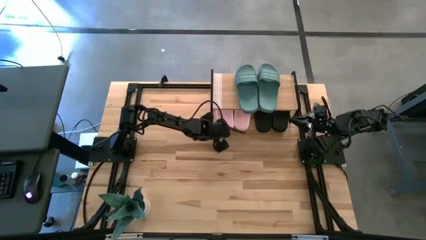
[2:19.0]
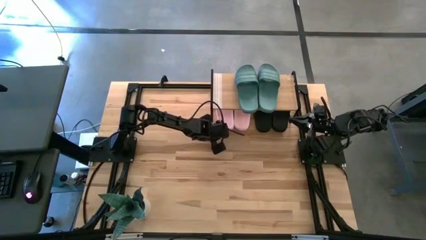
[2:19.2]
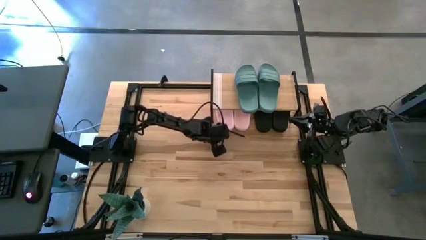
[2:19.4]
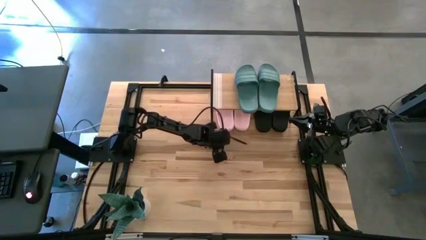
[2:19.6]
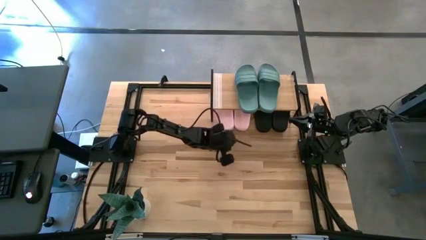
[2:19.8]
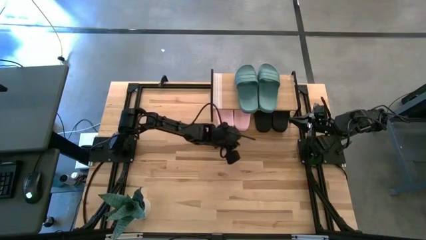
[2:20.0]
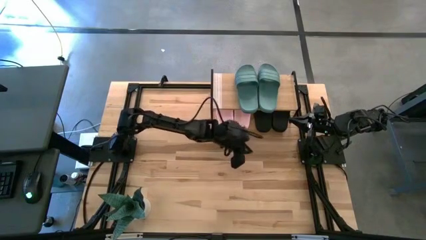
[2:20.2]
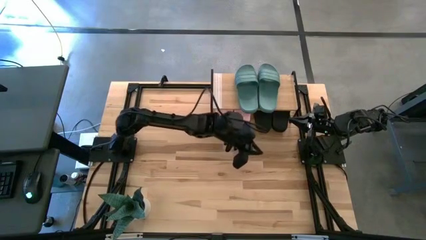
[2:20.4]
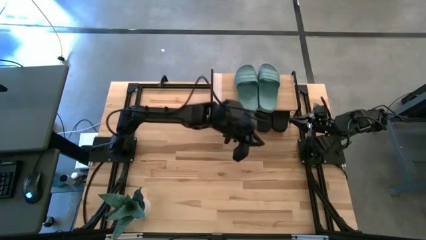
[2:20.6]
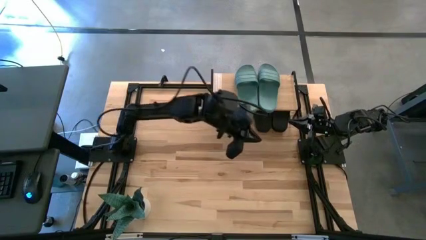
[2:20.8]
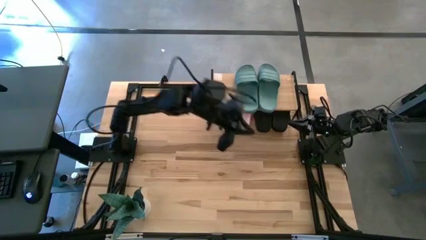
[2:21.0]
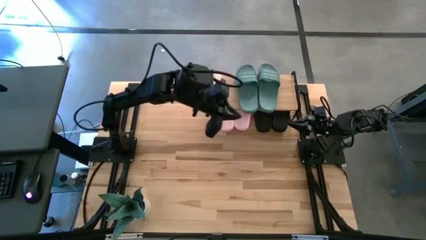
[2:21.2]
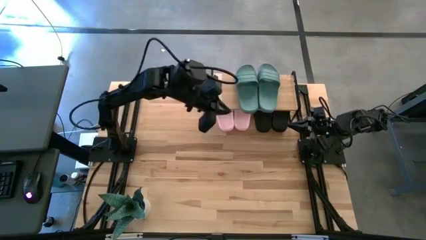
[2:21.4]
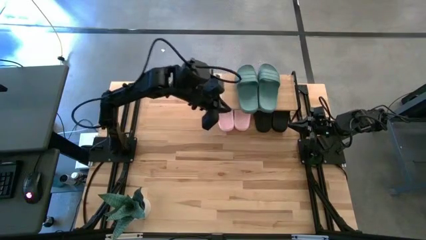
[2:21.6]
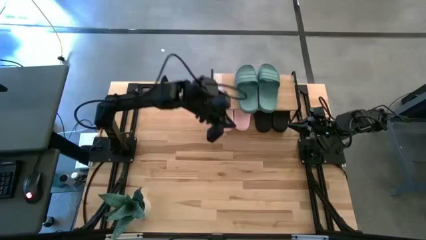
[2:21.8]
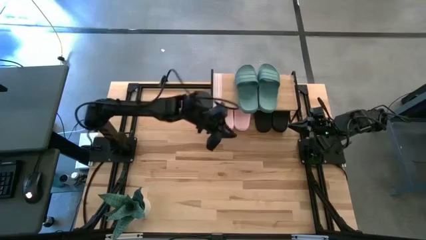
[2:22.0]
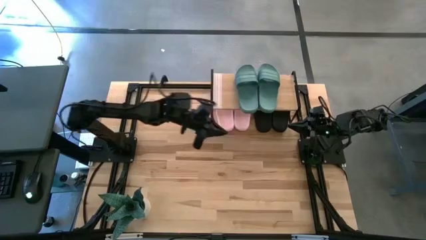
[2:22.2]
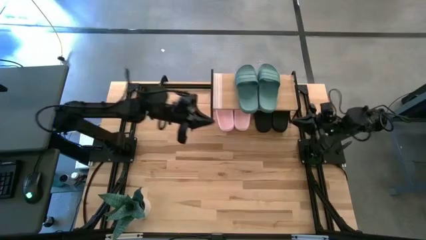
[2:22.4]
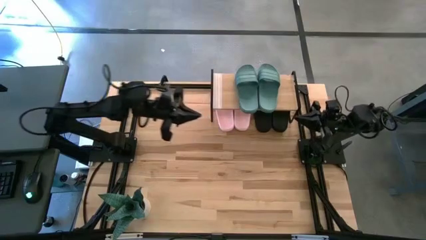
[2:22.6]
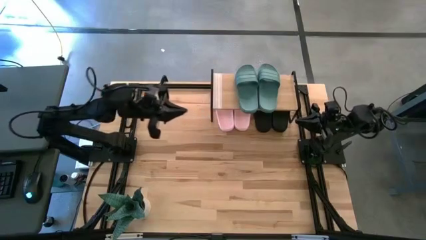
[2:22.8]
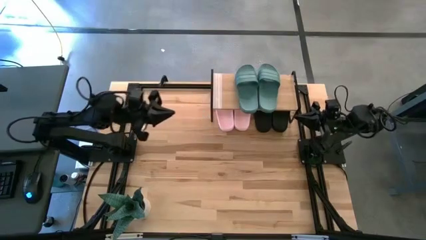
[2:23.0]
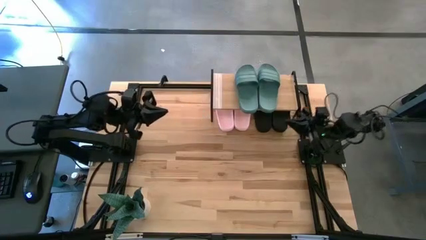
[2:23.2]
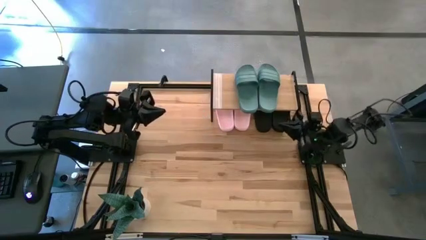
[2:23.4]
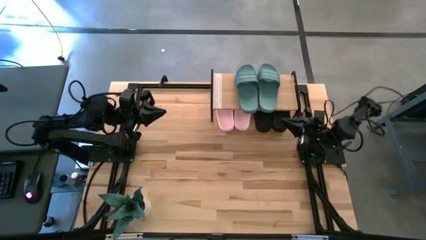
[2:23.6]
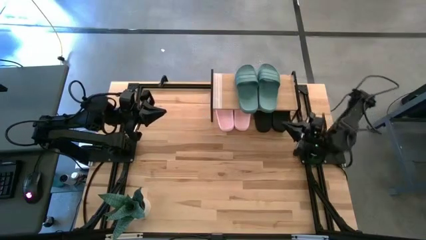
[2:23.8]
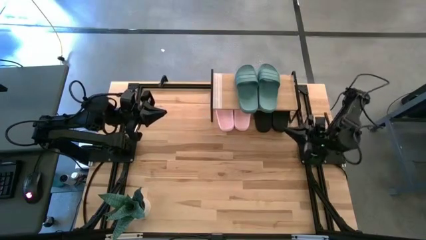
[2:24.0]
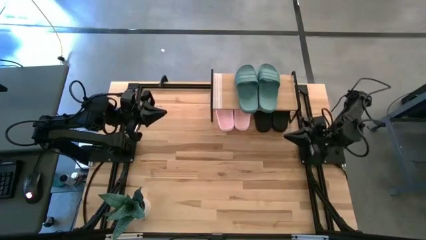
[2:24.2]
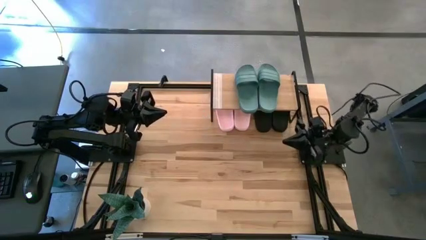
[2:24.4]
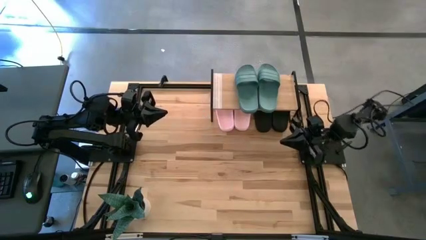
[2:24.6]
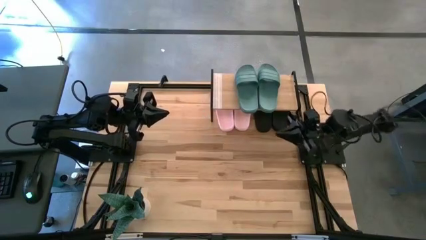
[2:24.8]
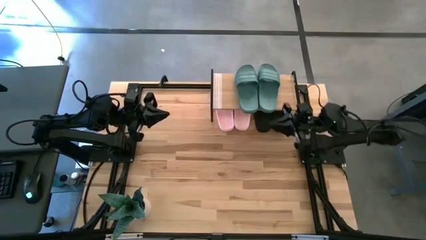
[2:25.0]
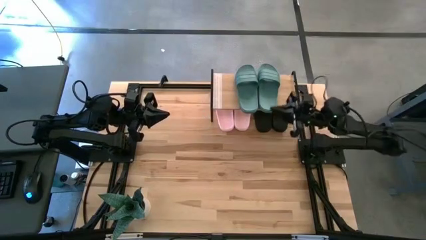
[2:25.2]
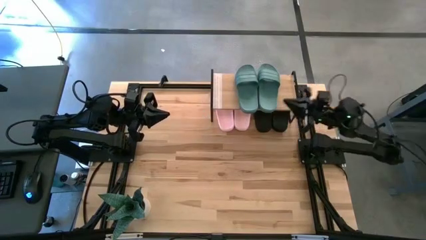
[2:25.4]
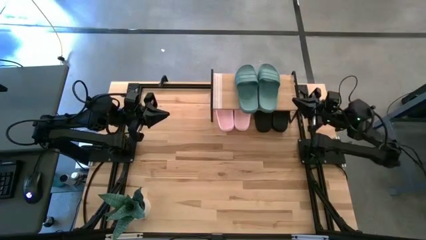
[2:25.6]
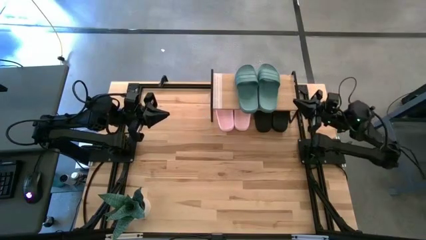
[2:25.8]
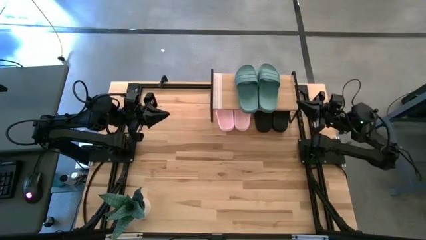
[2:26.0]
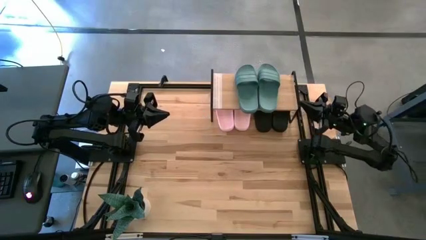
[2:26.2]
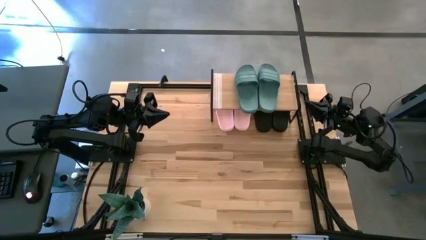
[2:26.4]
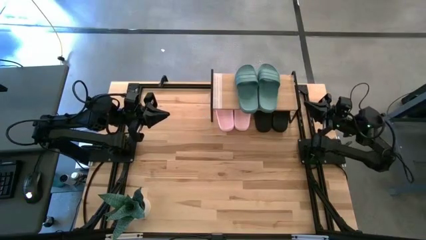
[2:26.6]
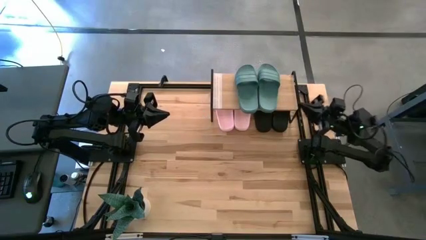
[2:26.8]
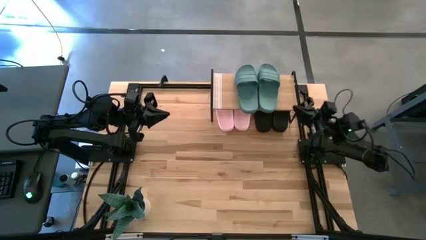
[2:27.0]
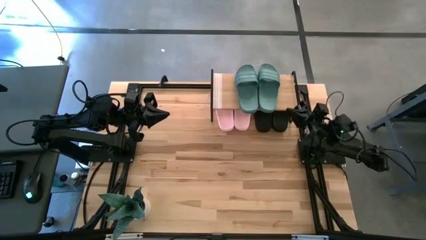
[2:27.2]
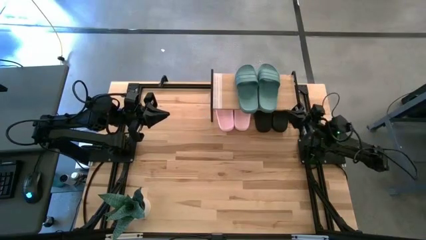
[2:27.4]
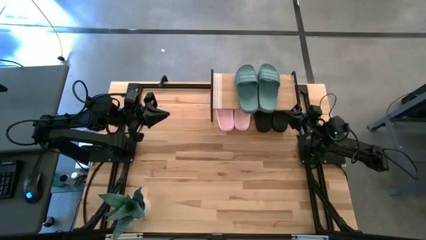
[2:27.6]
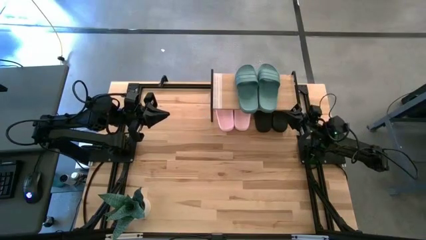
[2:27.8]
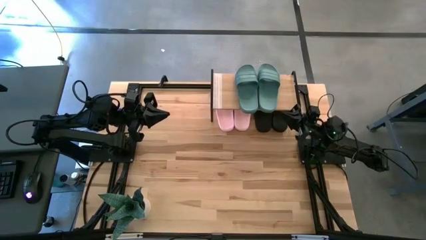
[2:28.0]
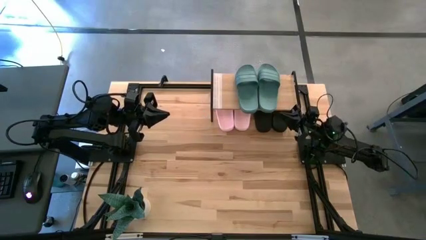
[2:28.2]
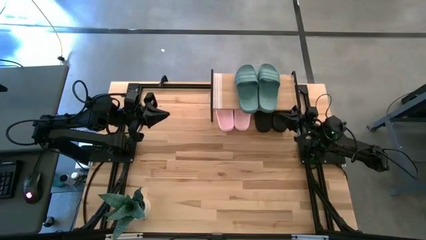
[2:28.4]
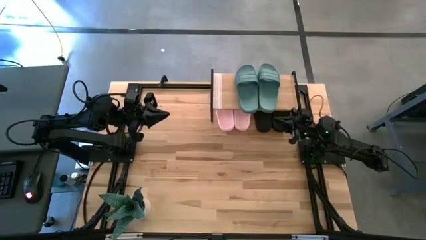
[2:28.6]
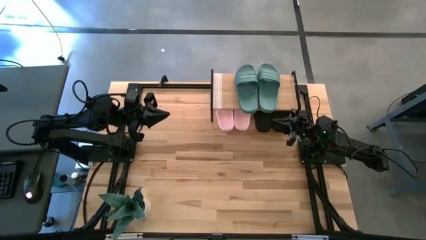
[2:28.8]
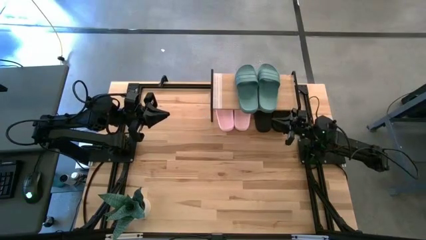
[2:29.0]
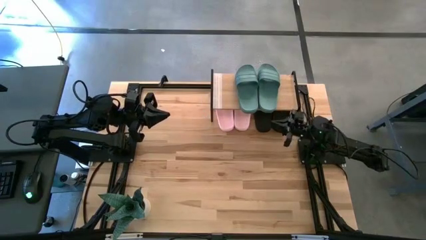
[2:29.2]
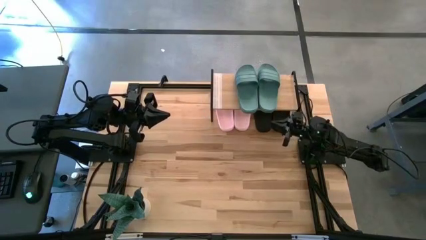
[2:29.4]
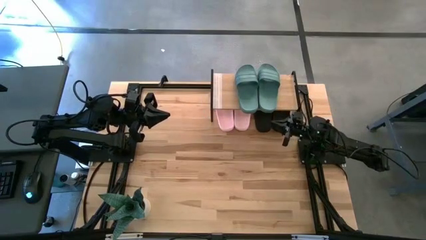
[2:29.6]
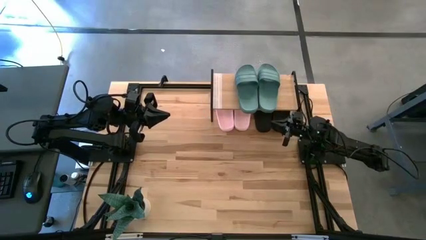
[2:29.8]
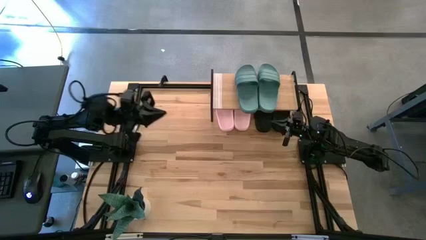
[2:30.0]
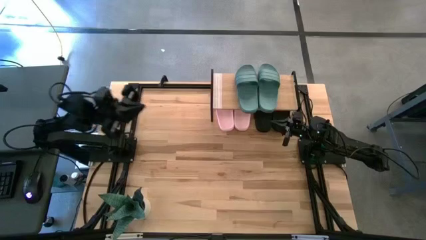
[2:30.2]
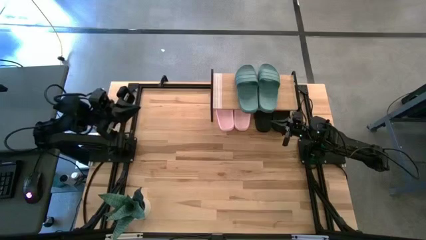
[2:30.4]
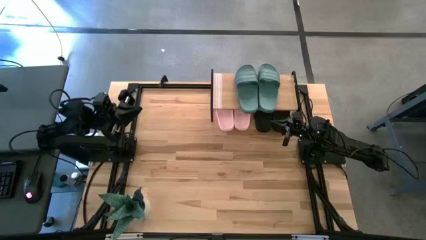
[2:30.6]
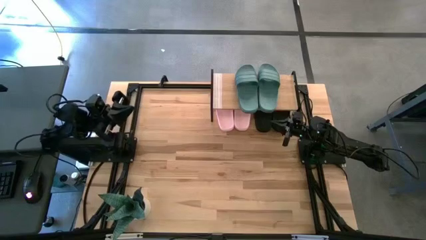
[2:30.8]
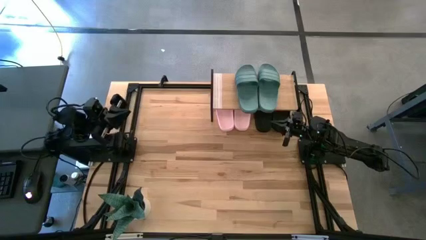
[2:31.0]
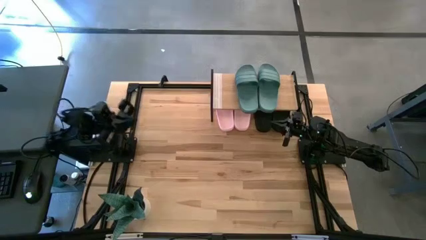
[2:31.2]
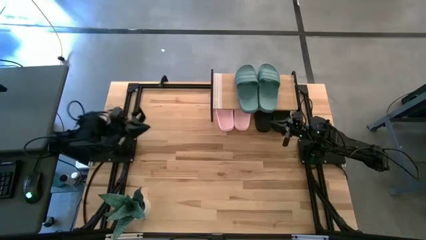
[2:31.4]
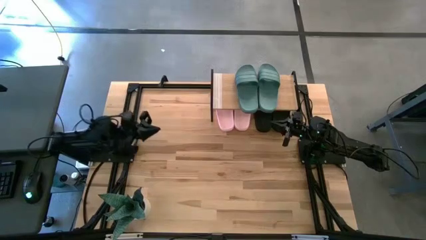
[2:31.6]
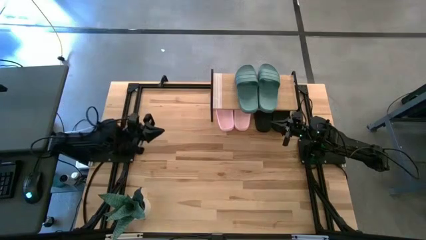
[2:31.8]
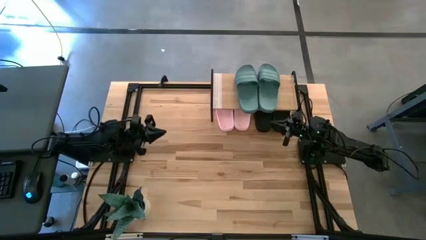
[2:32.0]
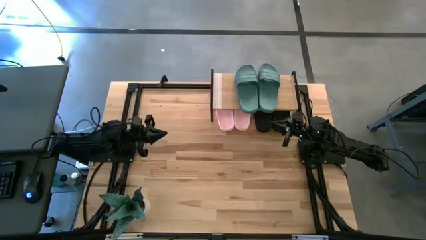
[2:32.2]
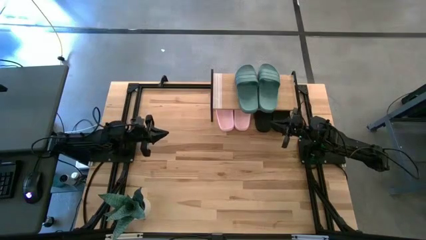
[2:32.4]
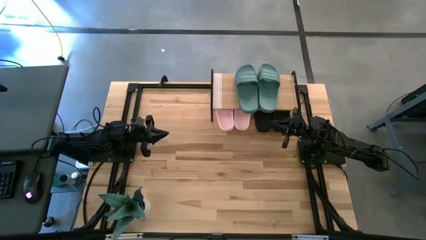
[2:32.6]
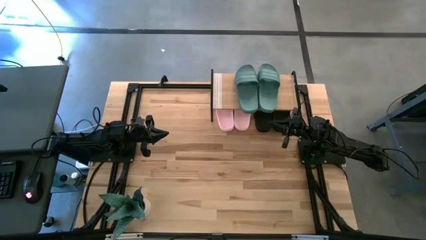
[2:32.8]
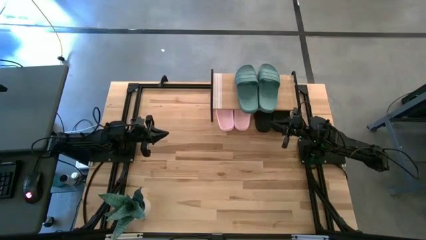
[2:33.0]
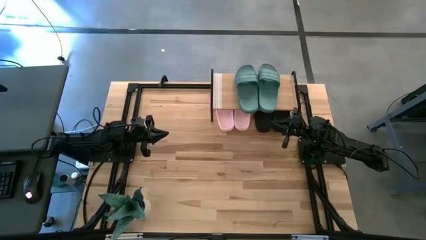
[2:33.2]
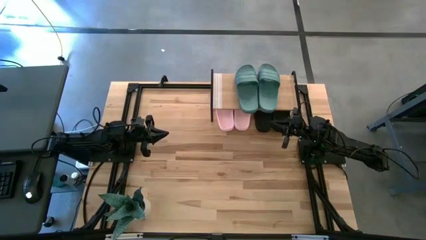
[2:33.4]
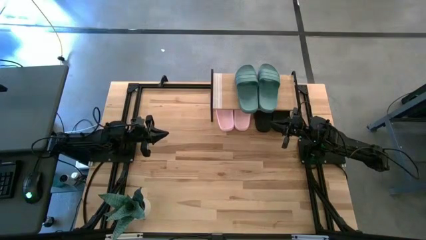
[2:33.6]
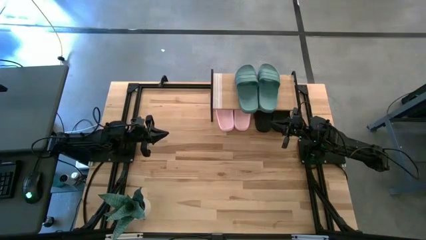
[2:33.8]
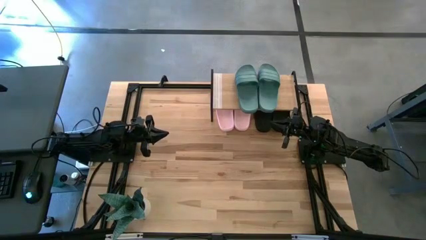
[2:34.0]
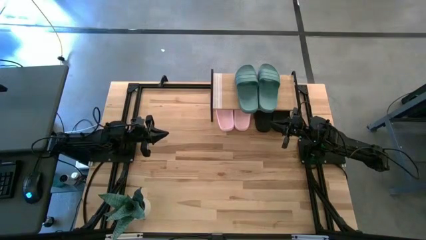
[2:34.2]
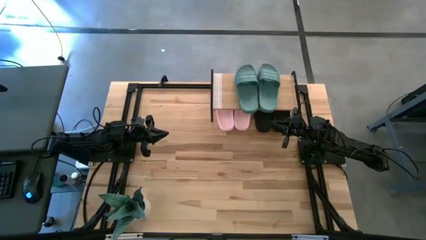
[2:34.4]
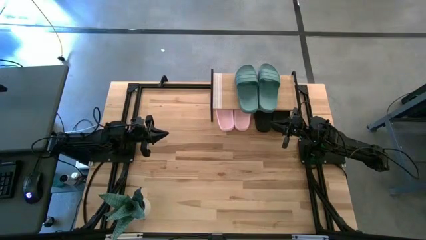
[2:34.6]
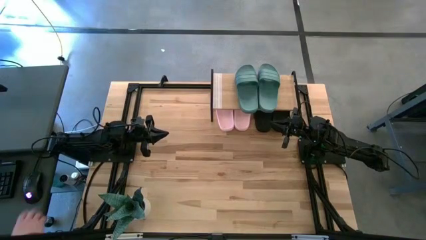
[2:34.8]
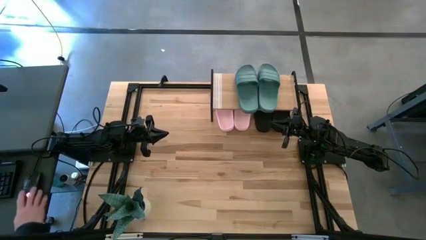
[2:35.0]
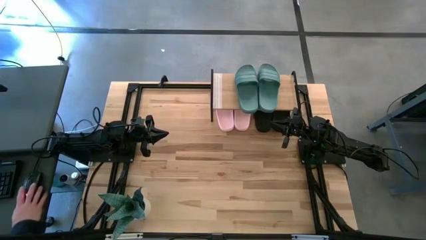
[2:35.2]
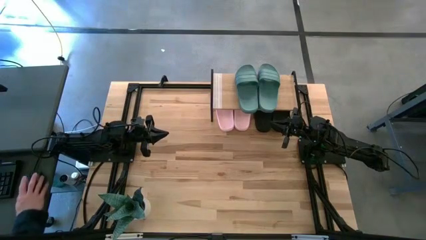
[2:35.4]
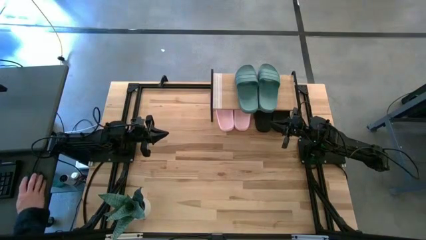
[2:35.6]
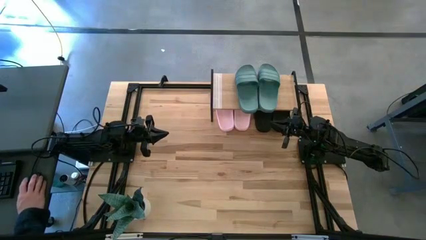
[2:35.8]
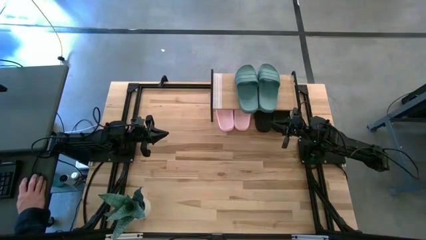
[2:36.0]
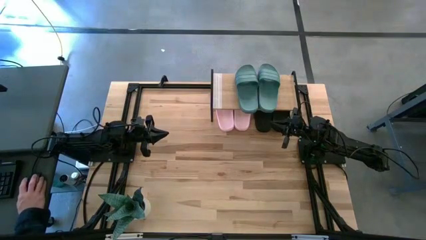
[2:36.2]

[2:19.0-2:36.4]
Task: Pick and place slides into the shelf
Return to Home Position
